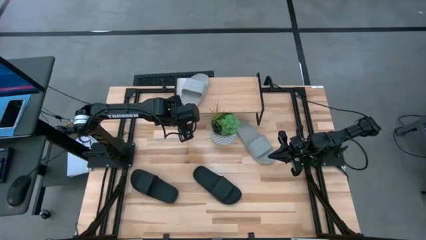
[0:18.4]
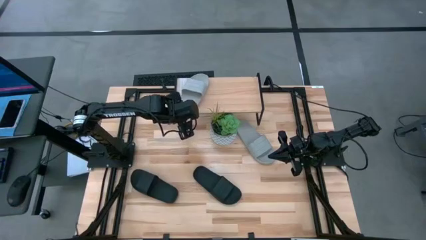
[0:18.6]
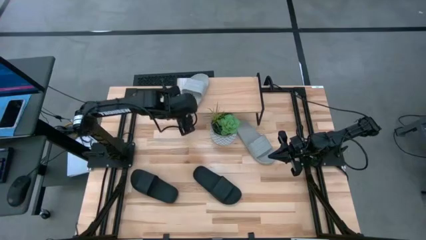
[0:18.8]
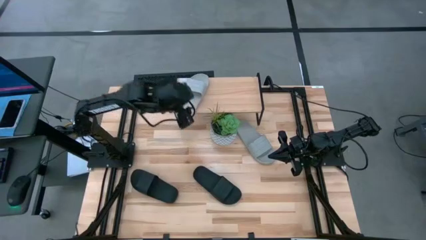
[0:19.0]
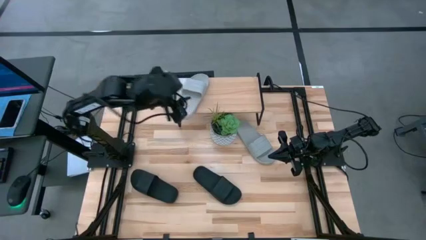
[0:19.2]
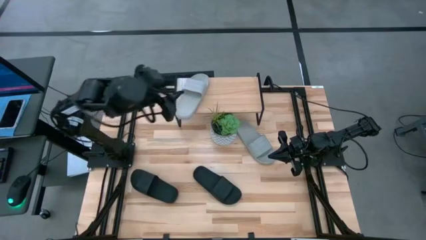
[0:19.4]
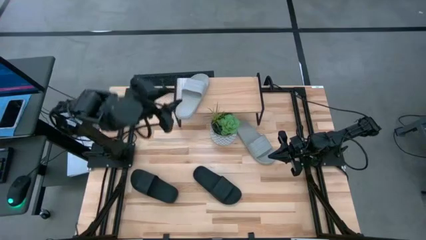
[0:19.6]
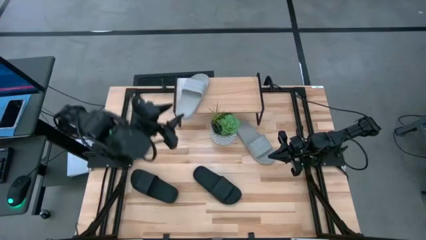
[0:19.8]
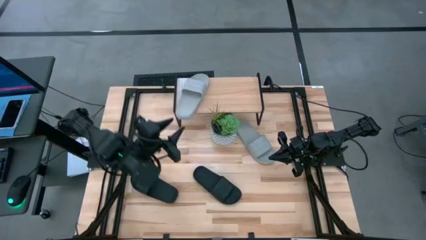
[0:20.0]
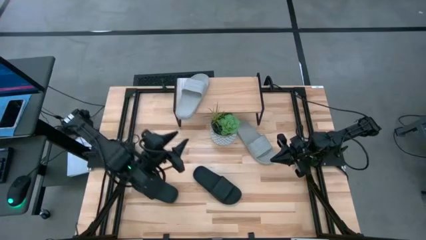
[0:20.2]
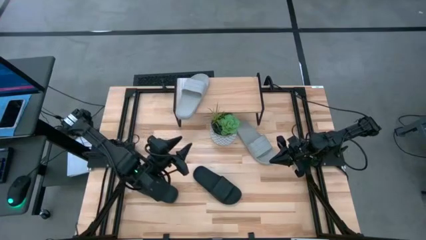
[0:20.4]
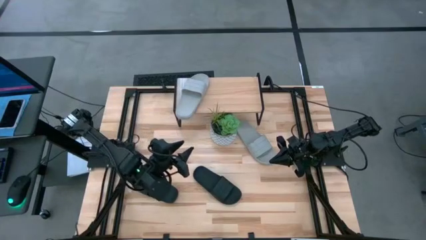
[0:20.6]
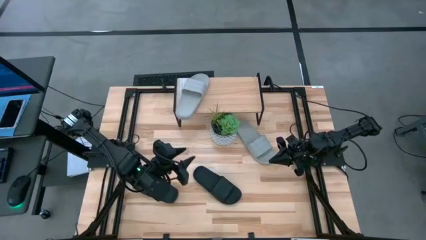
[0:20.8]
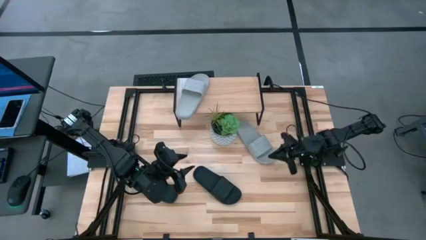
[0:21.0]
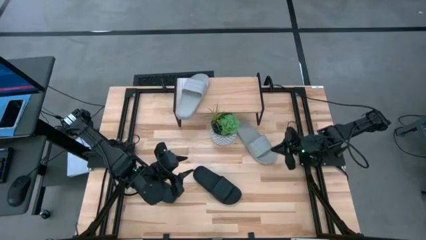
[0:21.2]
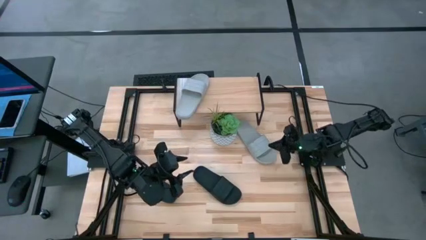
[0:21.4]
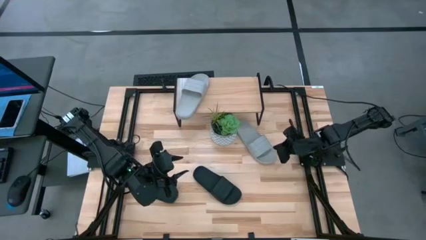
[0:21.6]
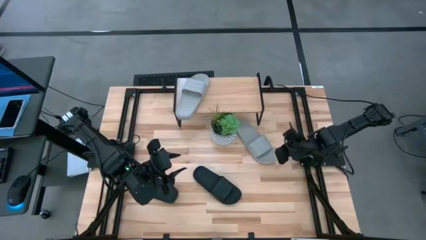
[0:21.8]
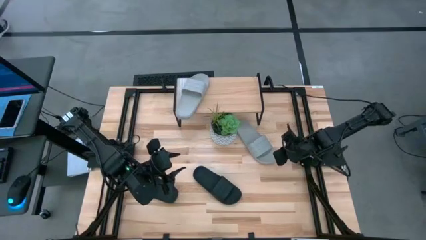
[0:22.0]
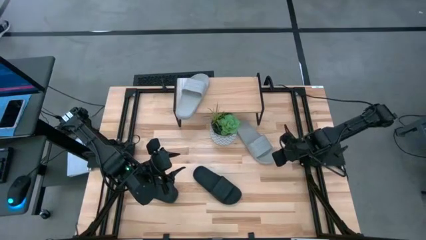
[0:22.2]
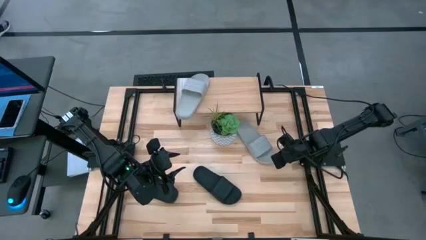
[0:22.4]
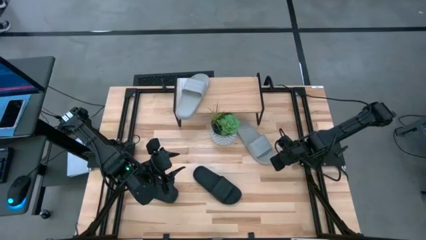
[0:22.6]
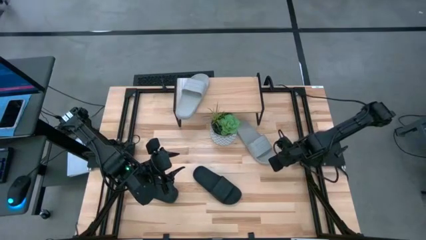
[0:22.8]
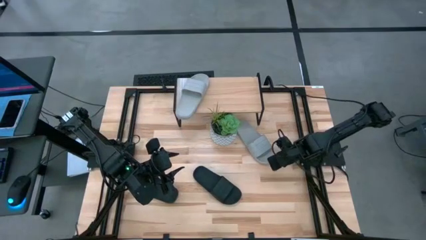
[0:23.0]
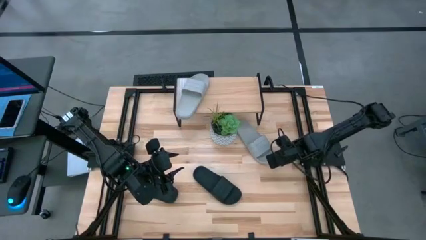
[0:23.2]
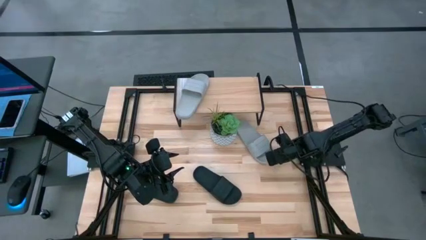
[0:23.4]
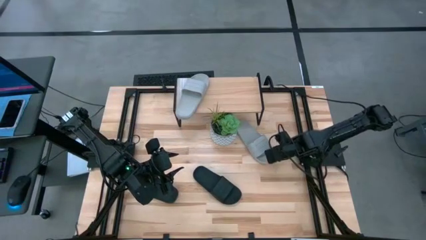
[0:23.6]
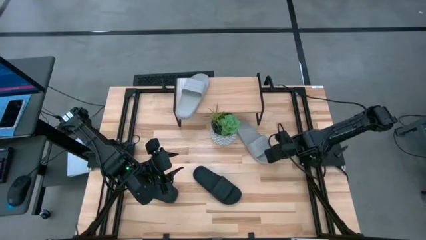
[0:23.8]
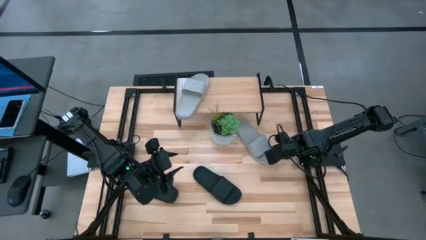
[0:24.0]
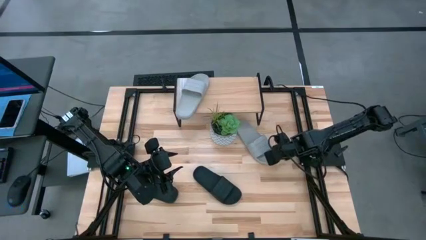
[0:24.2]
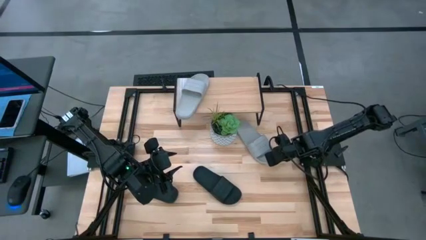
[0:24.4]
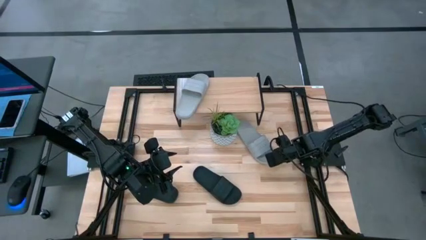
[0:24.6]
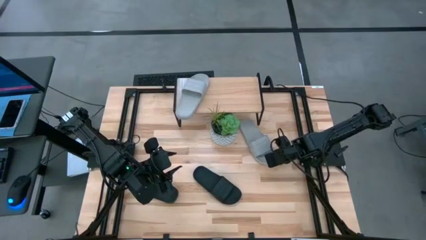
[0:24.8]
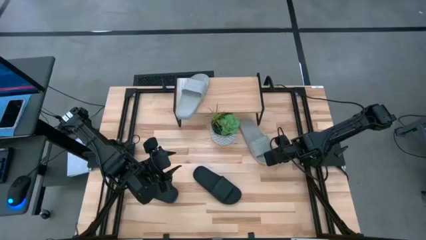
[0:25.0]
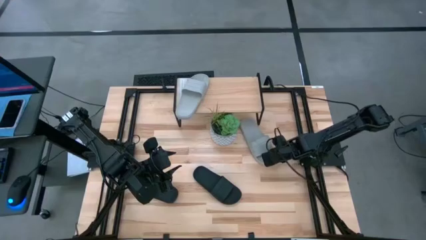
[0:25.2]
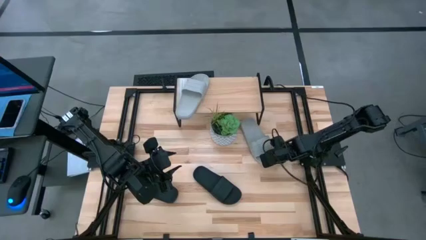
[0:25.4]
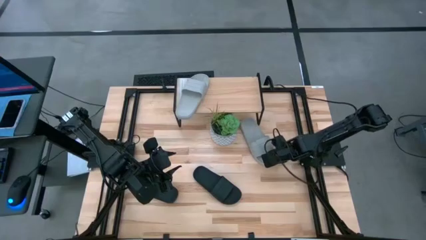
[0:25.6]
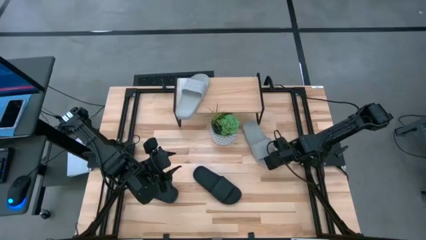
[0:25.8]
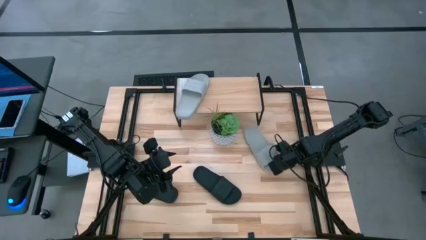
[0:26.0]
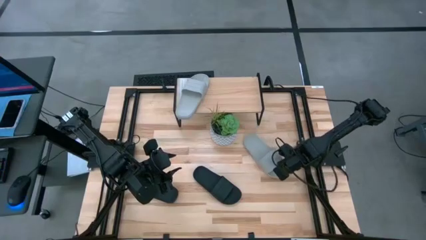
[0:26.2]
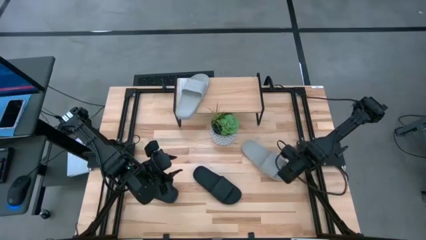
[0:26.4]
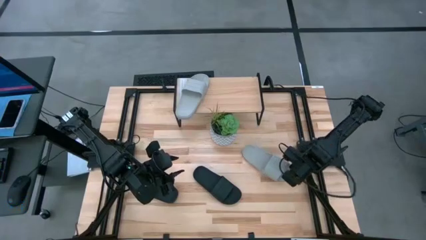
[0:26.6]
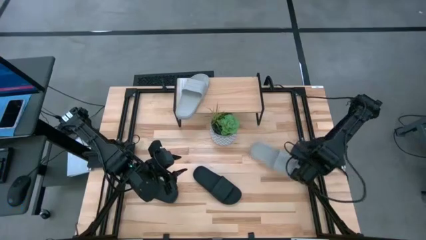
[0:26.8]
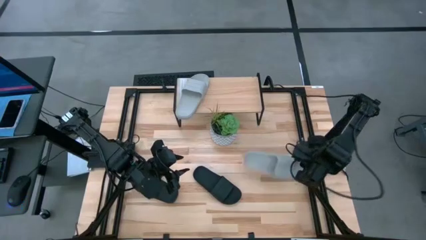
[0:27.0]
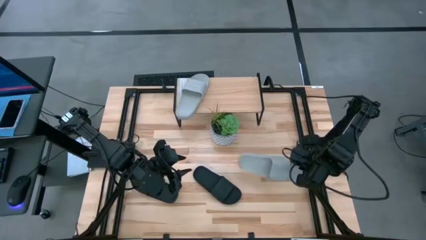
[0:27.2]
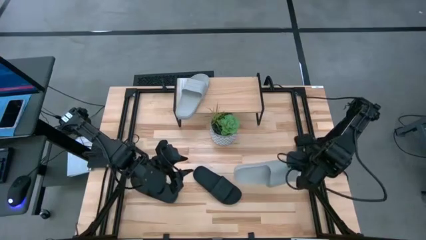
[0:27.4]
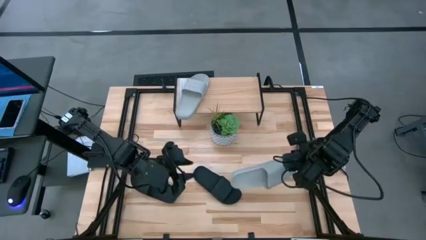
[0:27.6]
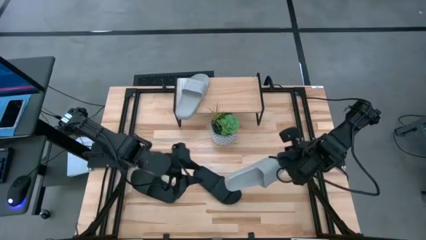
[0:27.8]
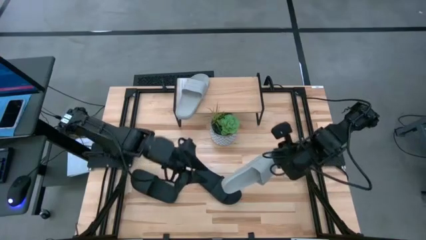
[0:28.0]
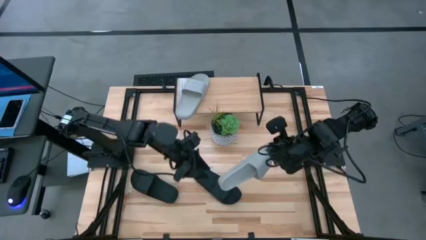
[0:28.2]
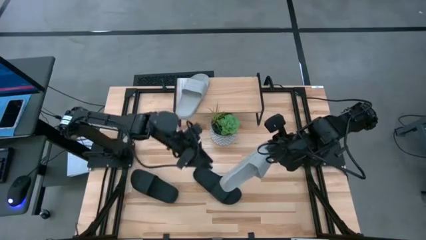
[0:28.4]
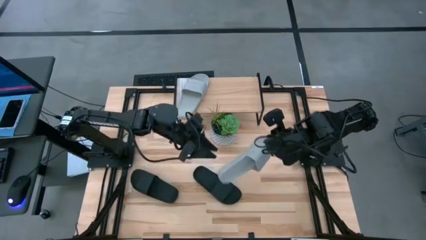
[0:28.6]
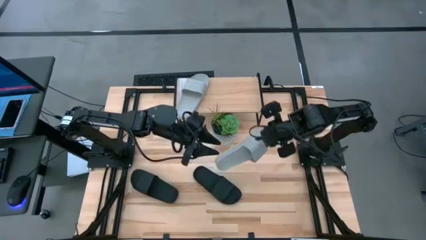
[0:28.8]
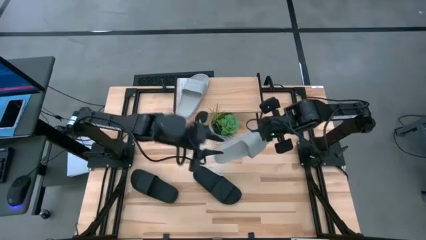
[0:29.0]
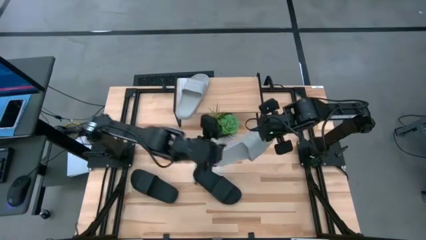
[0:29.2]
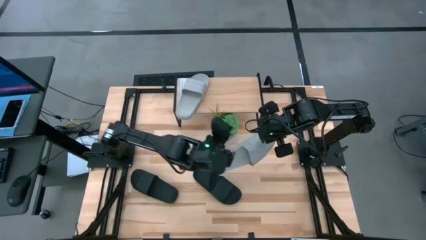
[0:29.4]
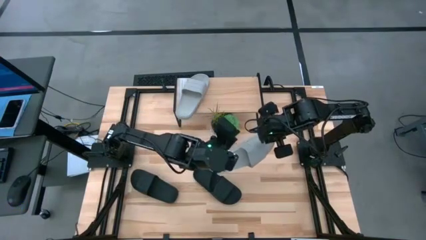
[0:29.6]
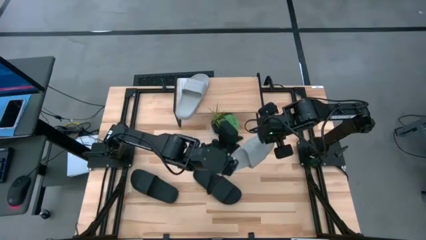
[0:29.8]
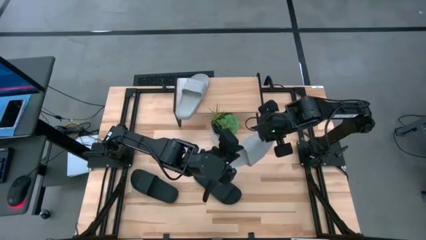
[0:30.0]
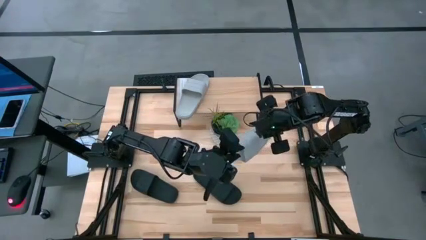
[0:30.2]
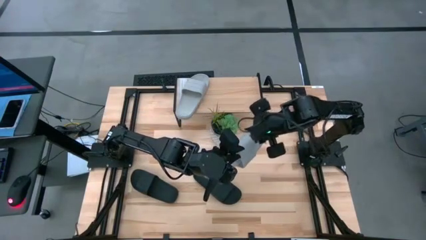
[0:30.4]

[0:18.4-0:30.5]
Task: Pick and place slides into the shelf
Put the gray slide on the shelf

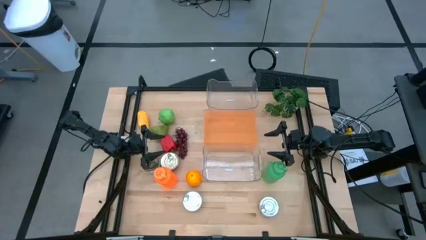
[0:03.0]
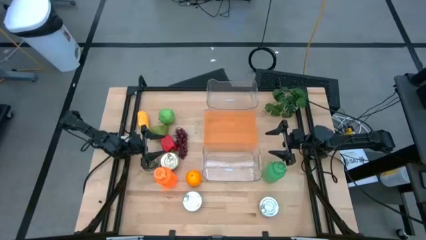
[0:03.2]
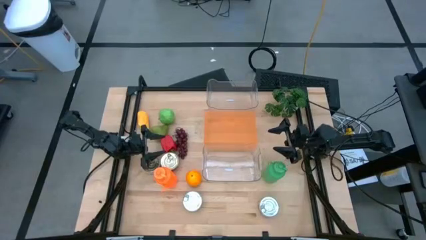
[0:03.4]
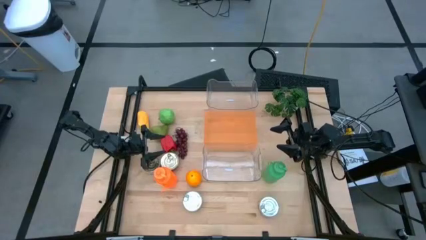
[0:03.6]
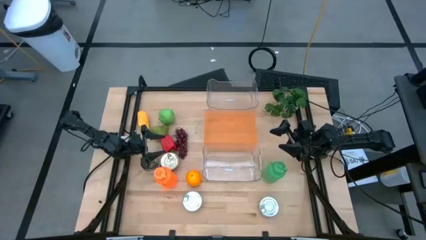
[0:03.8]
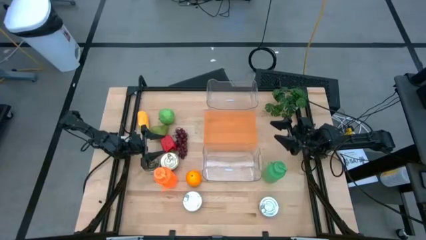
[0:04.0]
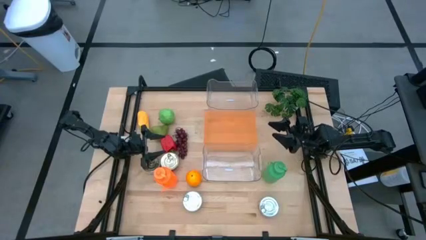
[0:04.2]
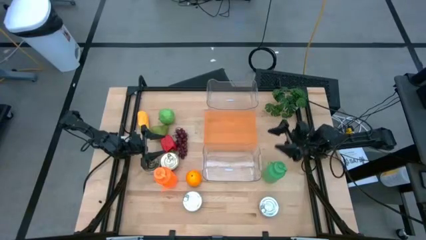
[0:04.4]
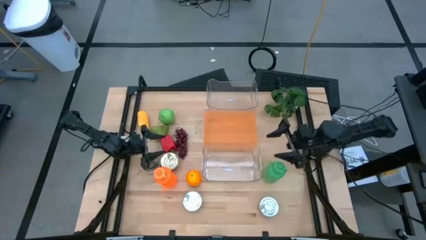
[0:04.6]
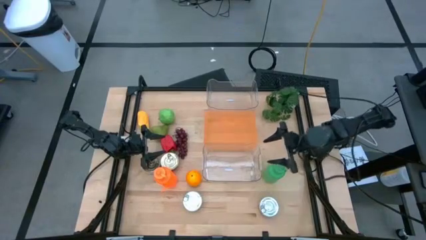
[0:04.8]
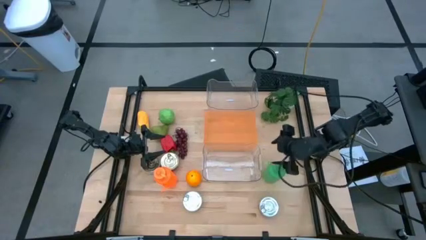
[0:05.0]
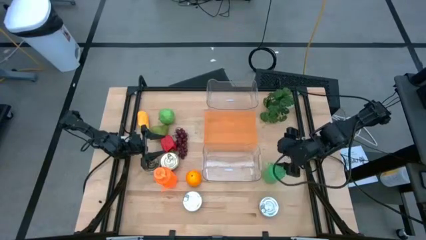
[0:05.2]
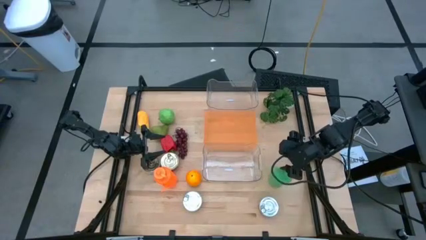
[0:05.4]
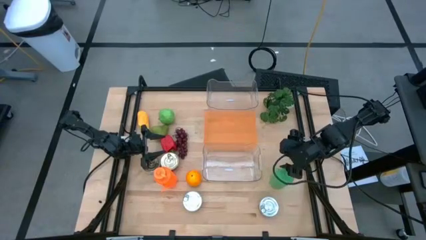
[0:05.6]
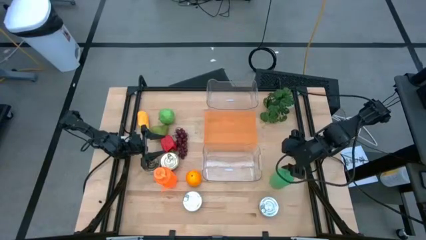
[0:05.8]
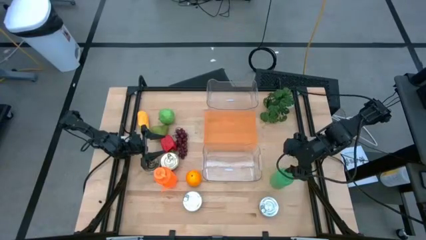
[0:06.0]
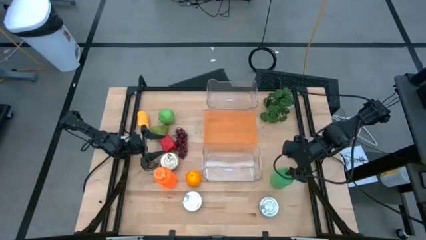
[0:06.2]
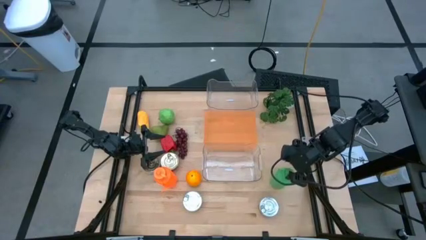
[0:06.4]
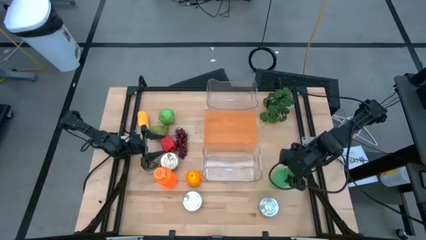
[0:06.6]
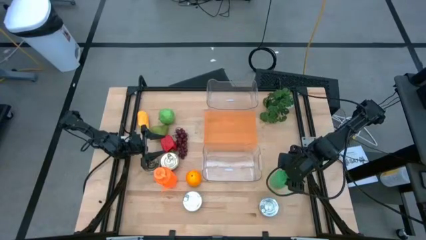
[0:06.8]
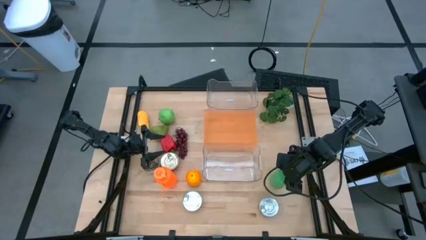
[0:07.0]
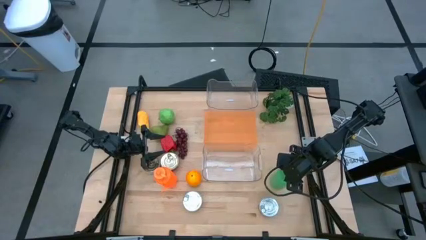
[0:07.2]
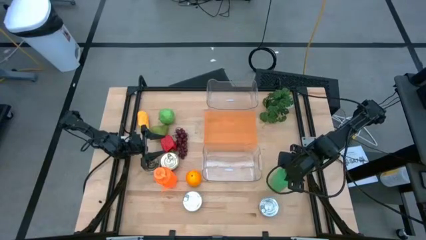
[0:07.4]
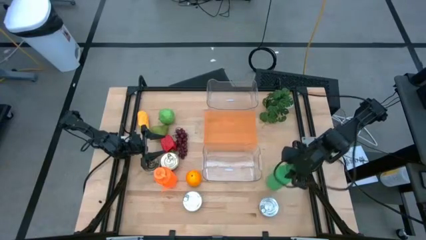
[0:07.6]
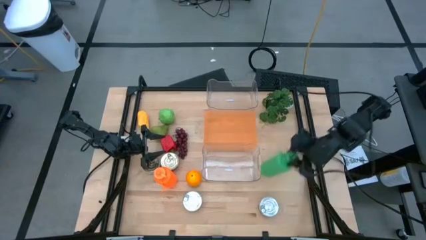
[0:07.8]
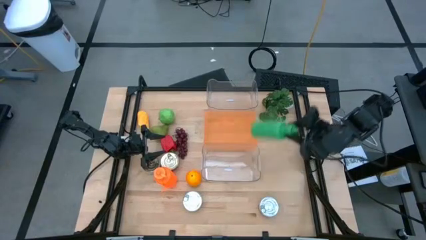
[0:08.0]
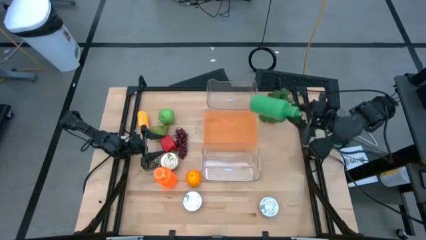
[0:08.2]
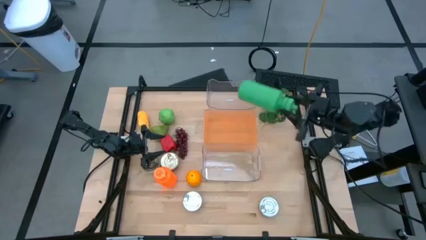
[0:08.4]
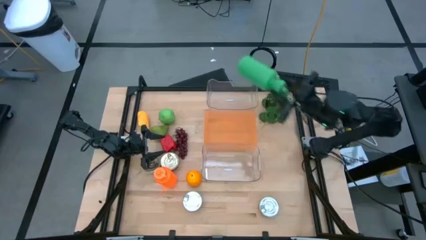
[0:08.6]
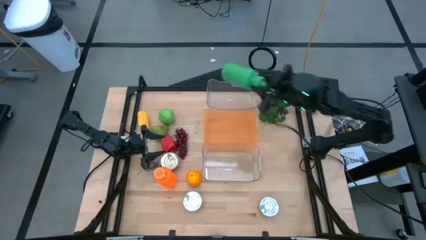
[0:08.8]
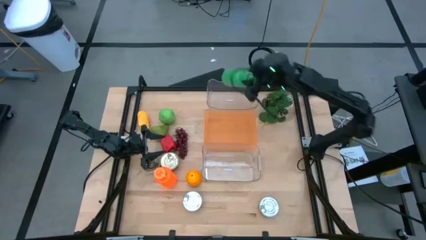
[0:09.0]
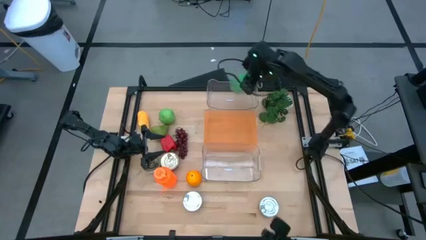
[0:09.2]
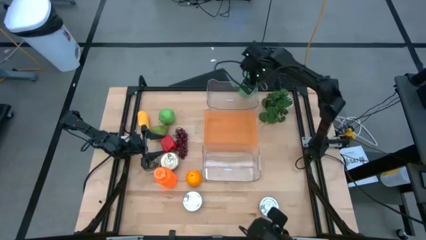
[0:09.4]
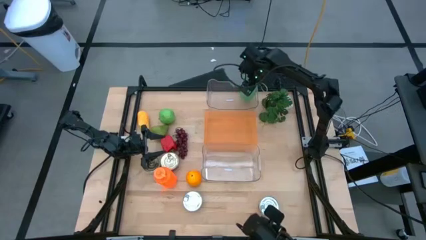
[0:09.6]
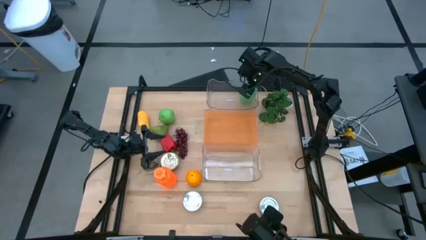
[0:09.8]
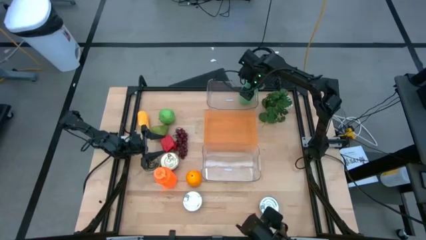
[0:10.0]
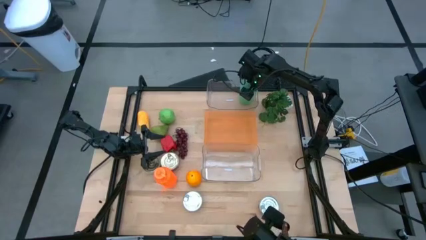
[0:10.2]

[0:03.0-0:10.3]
Task: Pick & Place Food Item
Put the green tumbler into the top transparent bin
